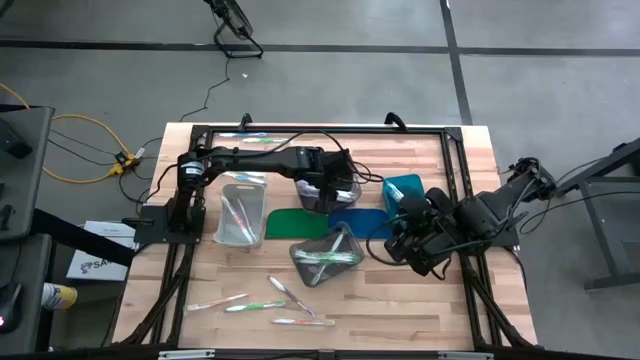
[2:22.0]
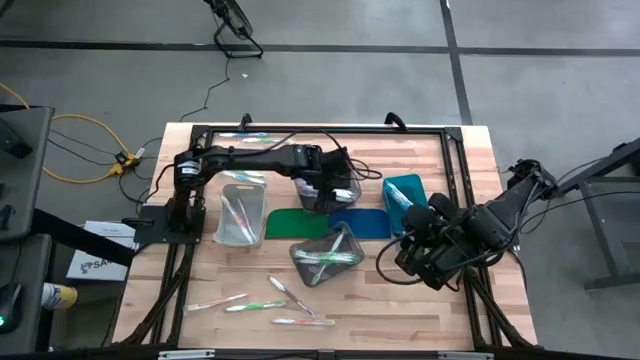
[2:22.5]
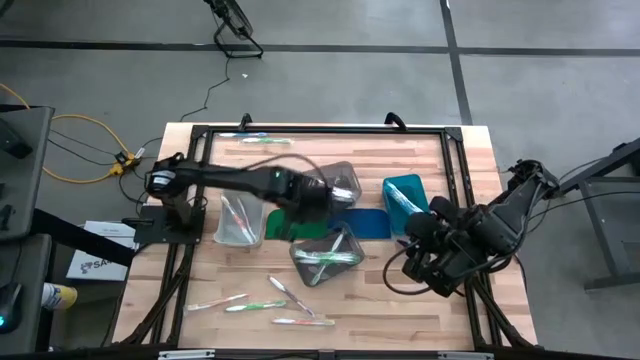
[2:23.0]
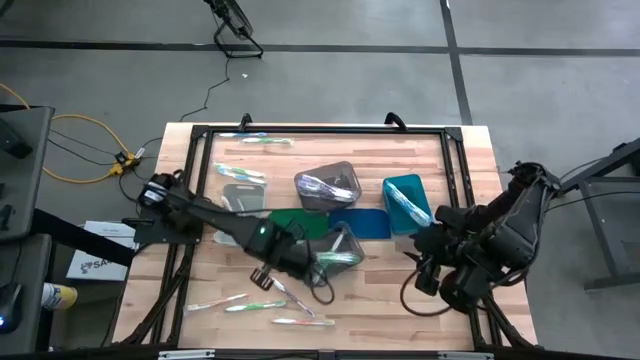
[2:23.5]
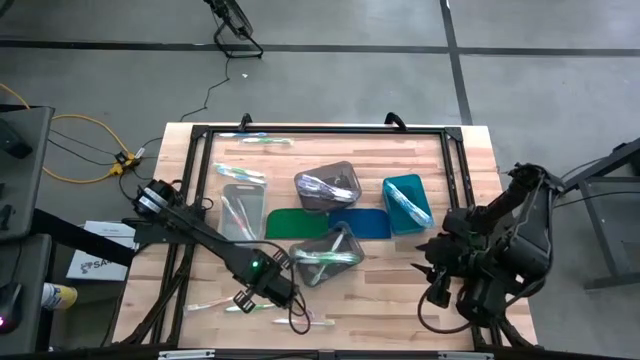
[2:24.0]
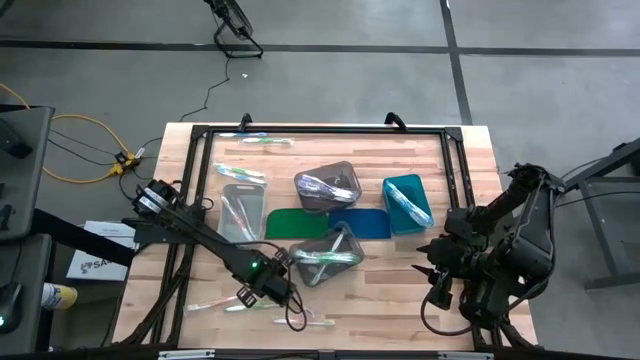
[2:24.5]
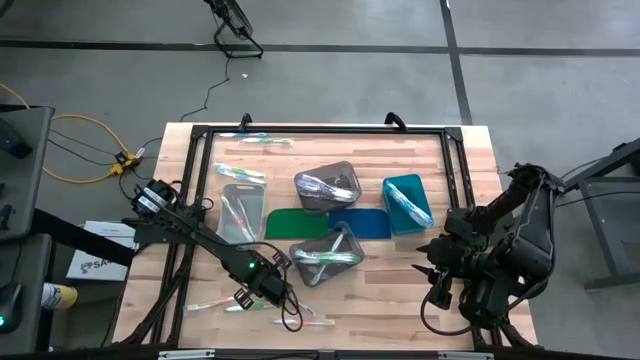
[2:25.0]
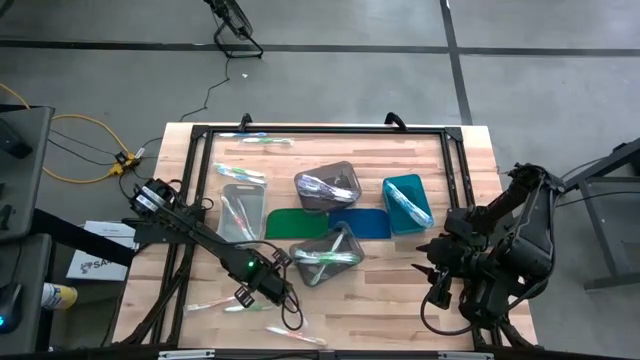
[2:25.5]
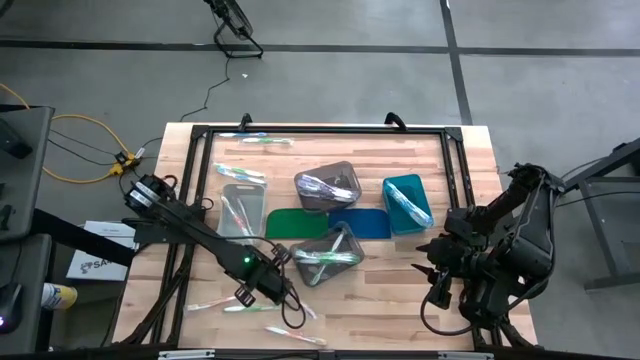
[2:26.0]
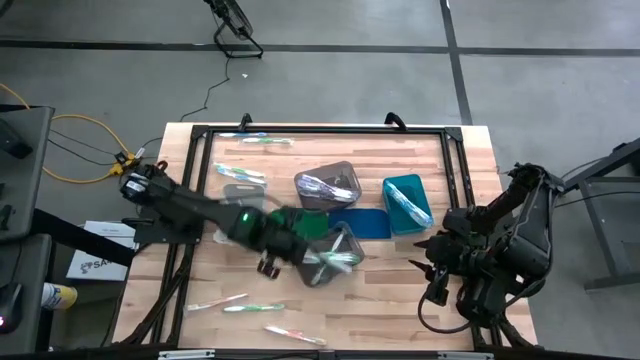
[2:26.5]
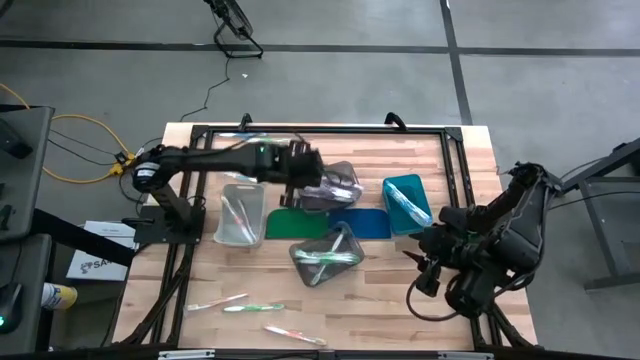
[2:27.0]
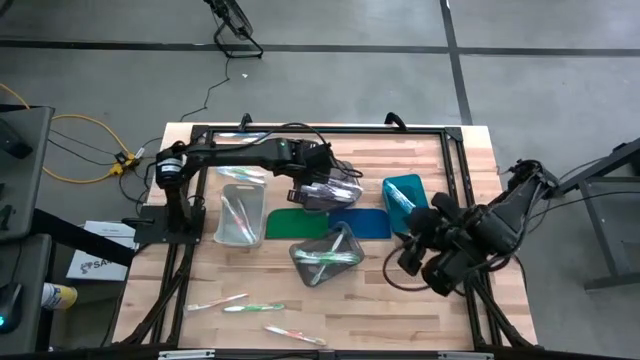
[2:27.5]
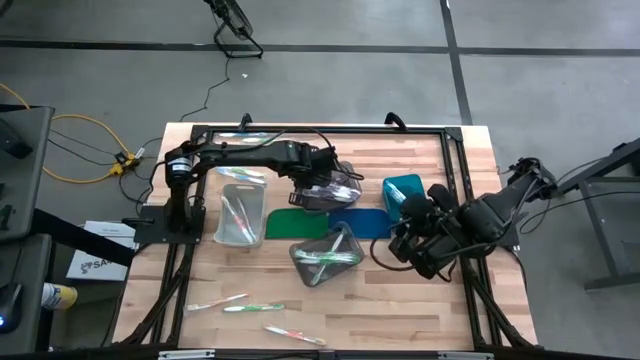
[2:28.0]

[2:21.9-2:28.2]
Task: Pick & Place Toothbrushes
Put the purple toothbrush into the top black bin

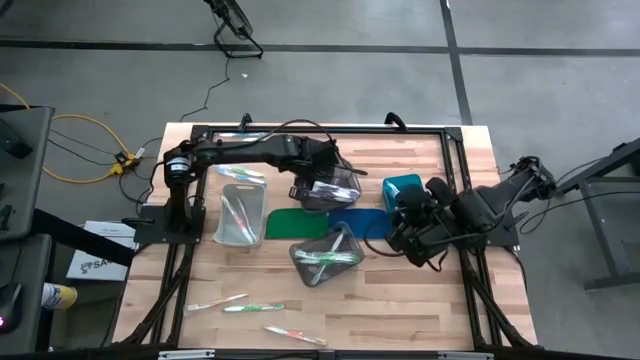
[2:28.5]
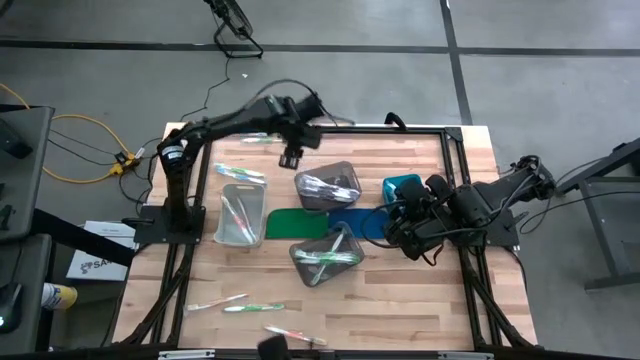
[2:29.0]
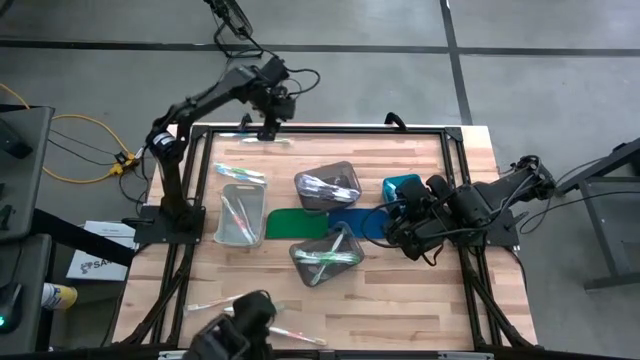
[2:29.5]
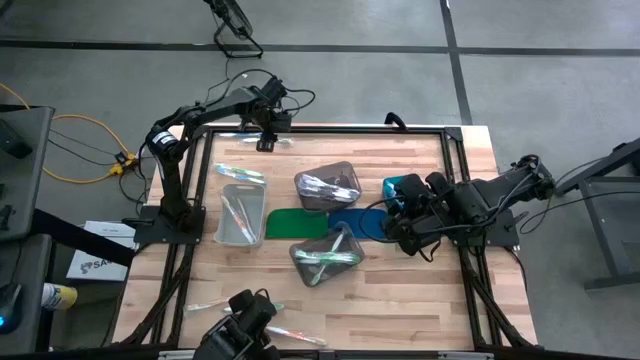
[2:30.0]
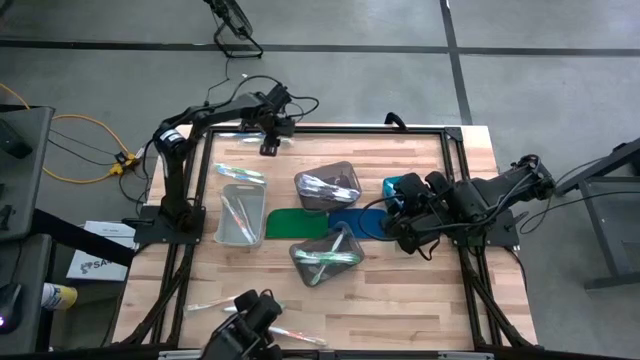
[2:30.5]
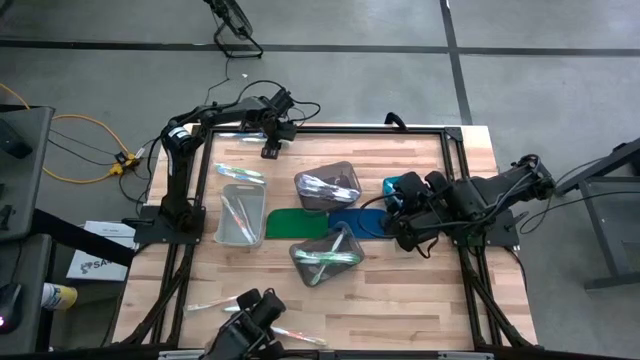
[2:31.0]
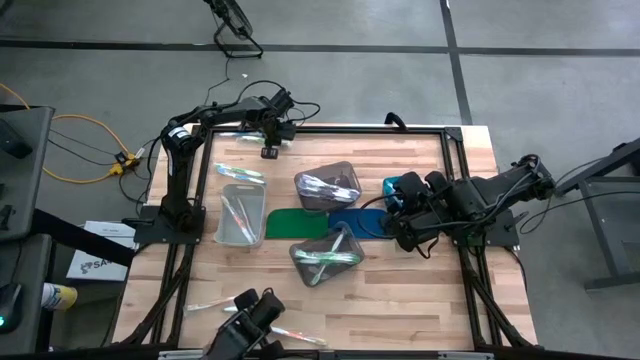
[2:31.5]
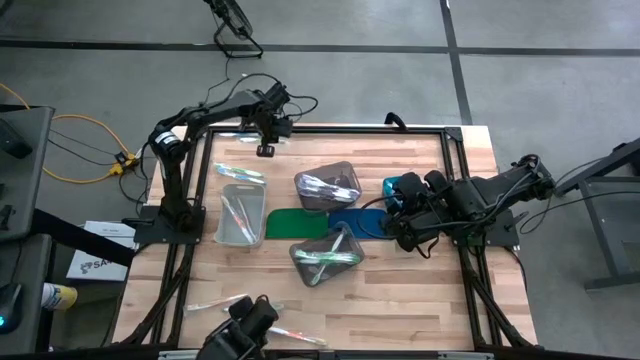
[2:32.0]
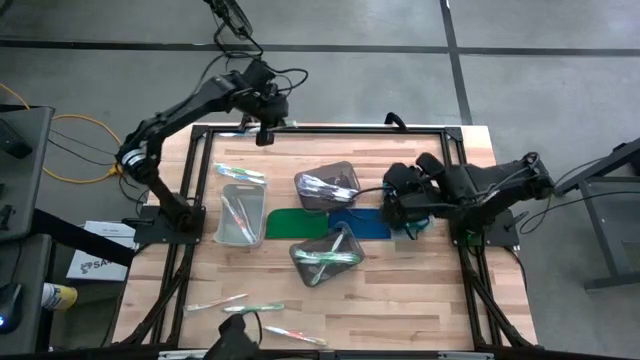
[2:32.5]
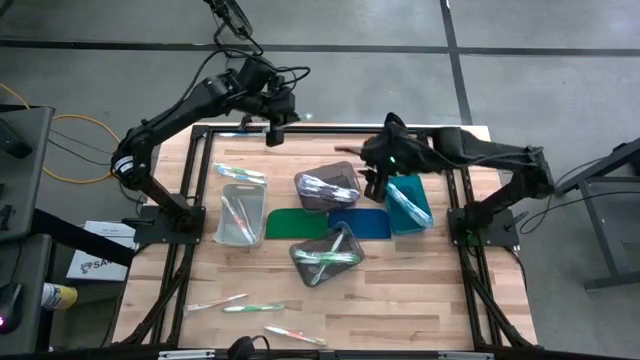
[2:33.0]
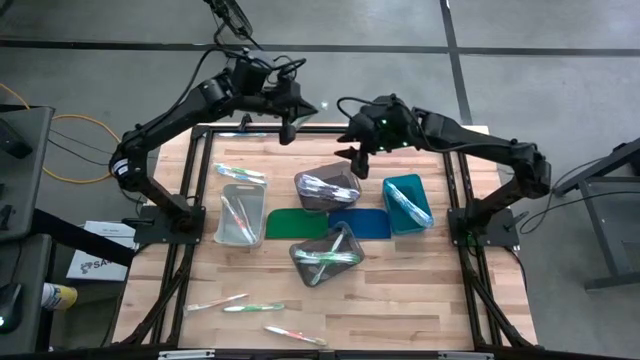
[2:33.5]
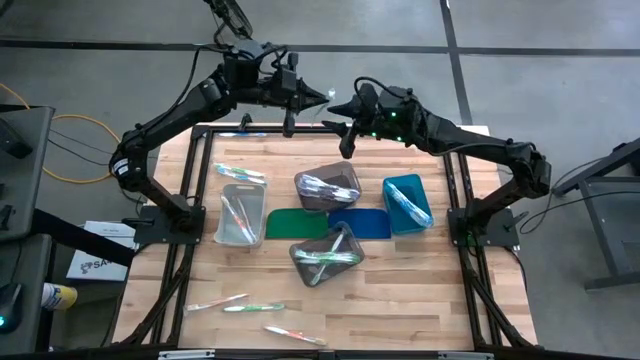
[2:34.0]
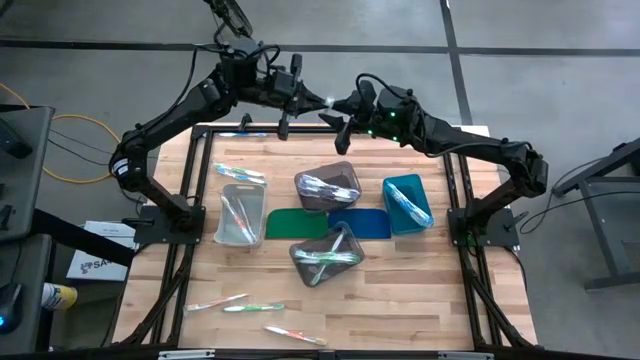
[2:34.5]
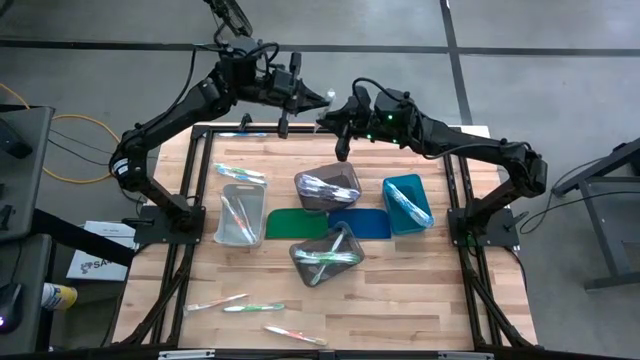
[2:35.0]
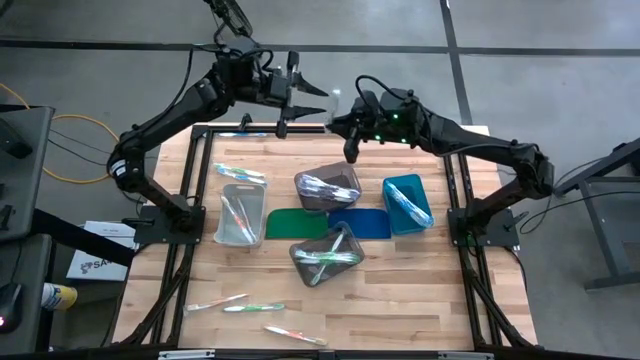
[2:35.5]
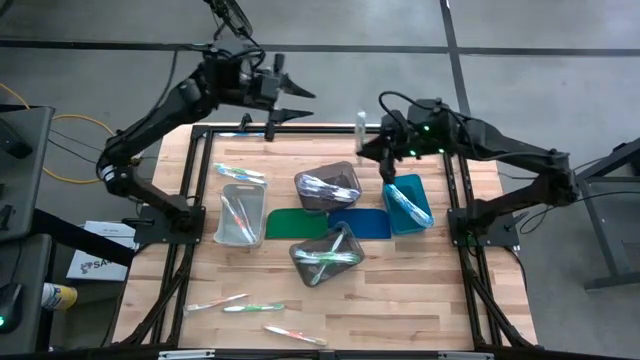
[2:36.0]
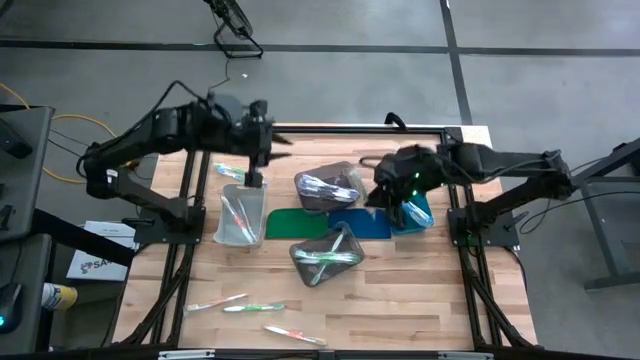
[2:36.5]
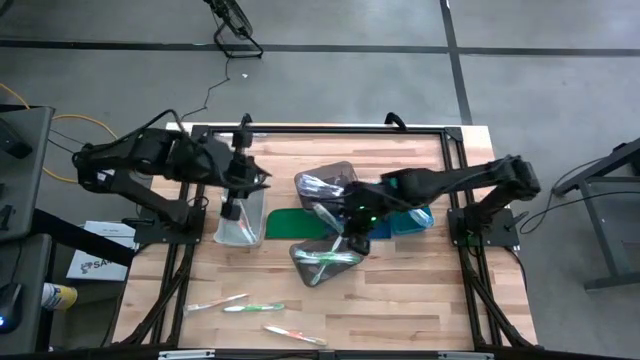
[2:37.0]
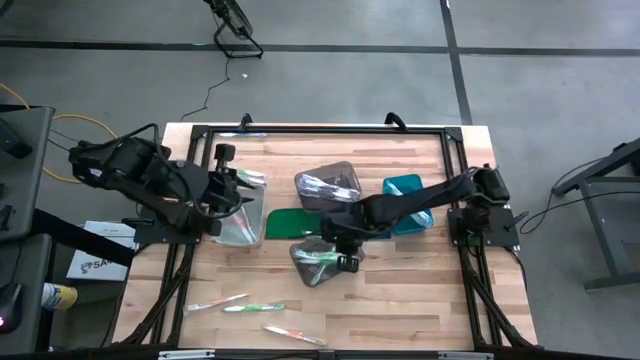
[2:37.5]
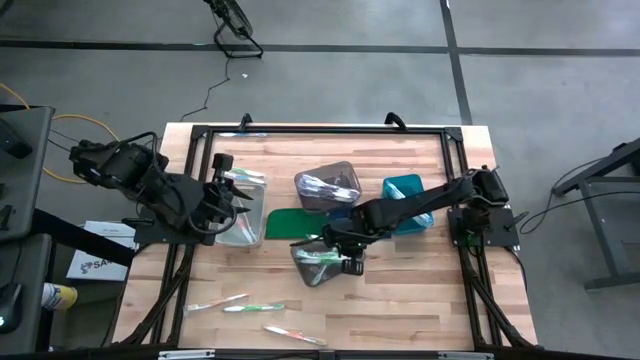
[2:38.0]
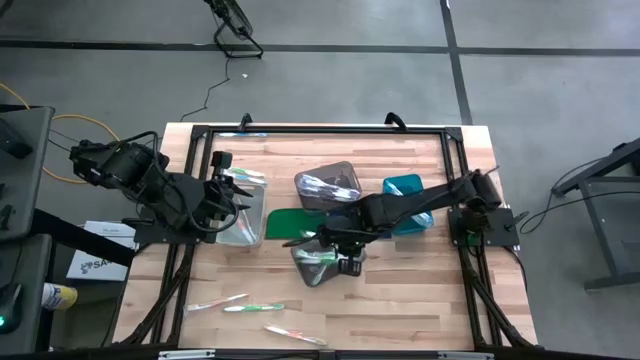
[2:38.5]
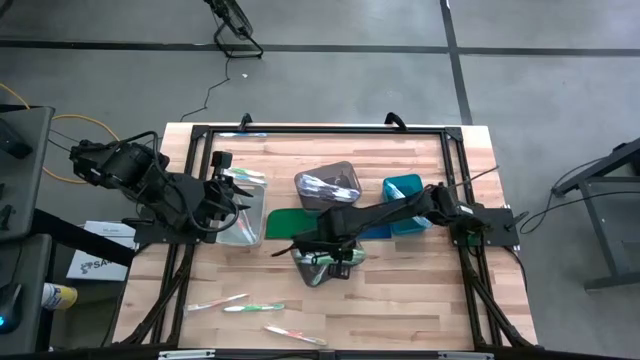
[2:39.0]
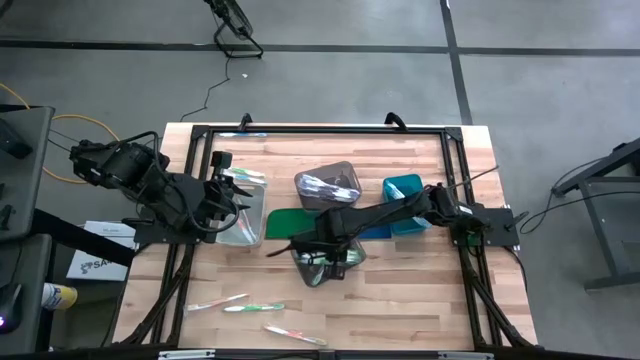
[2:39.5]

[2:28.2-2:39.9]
Put the green toothbrush into the bottom black bin

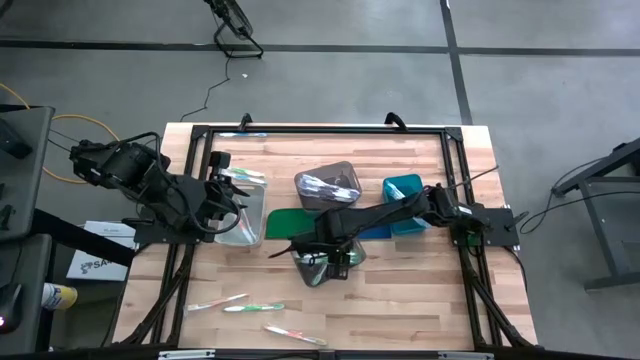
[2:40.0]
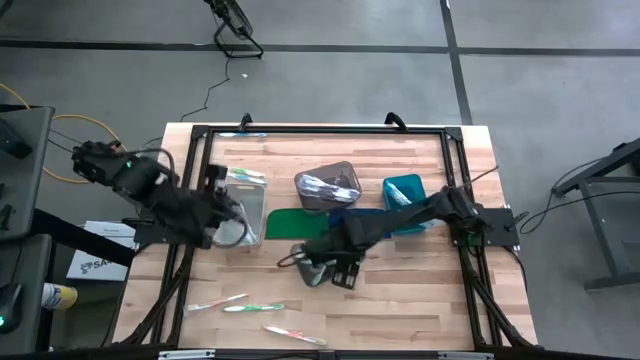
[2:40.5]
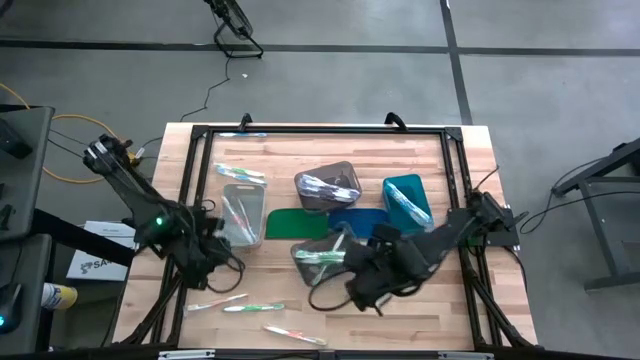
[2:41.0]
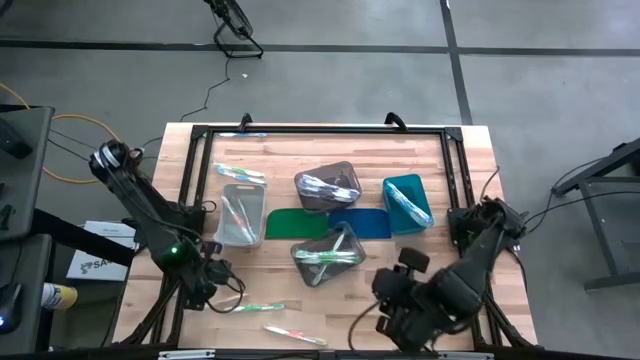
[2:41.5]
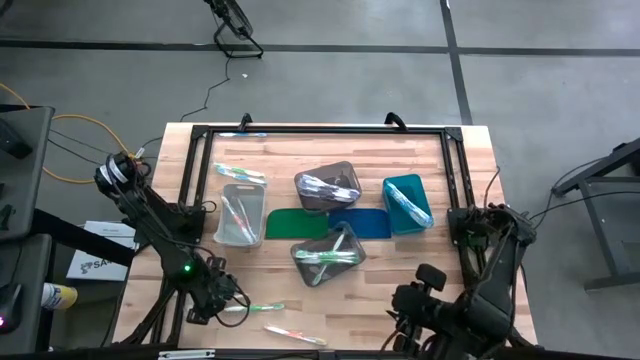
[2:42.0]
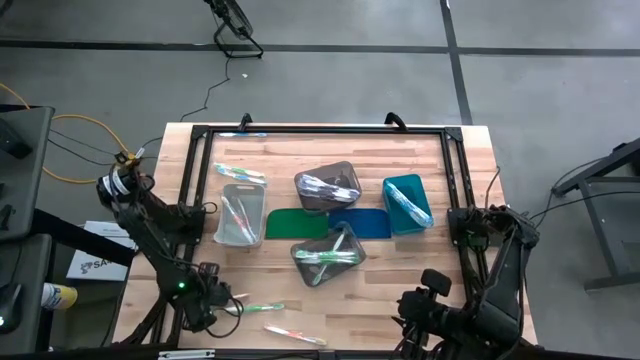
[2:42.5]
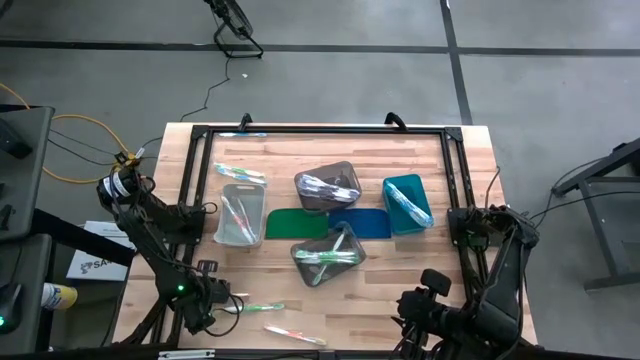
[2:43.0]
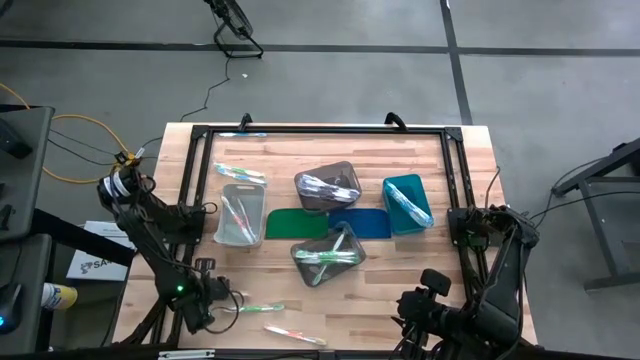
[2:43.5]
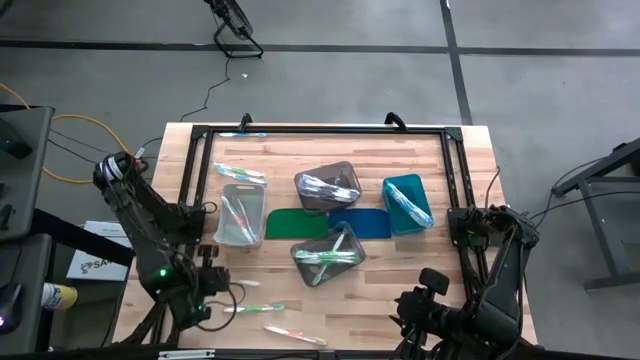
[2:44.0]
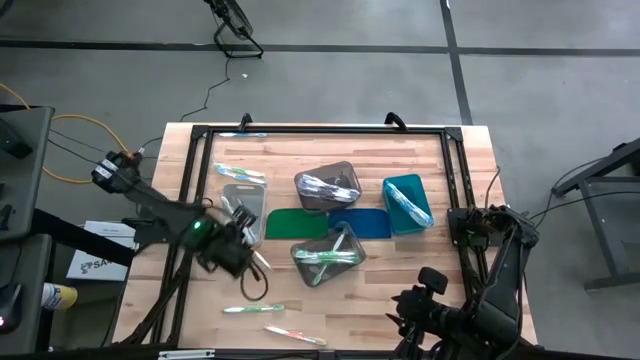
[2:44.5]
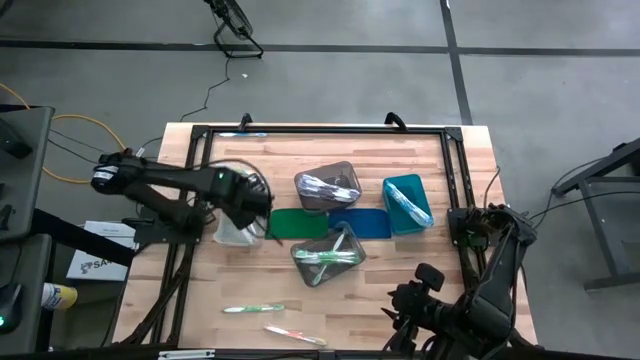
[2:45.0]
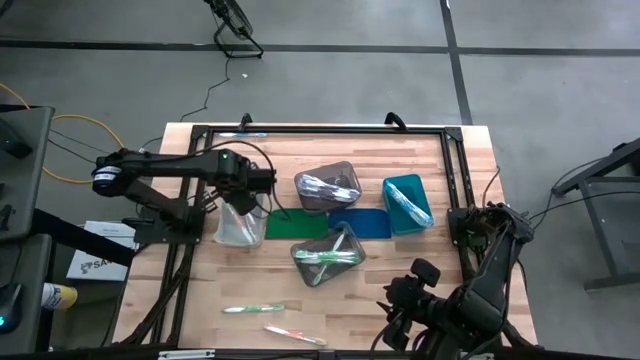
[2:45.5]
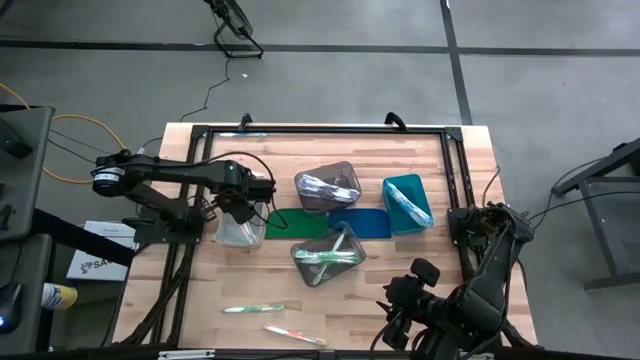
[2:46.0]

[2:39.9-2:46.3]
Put the orange toothbrush into the gray bin
